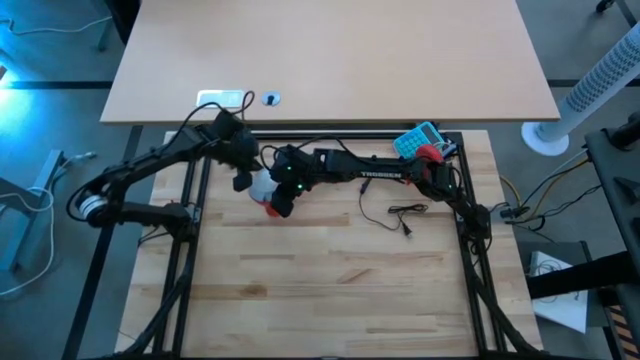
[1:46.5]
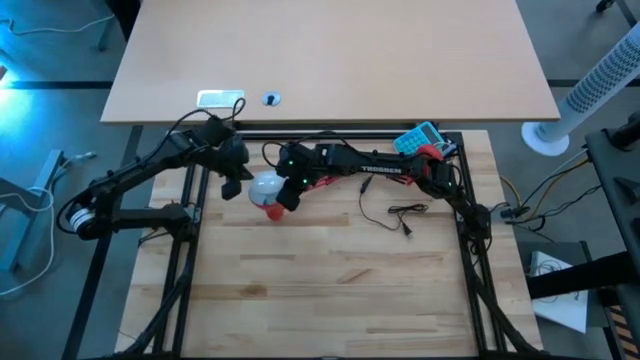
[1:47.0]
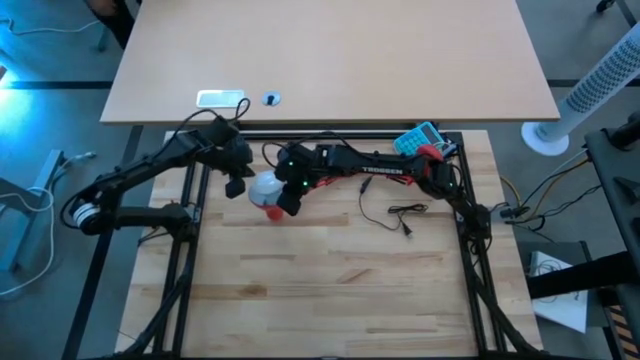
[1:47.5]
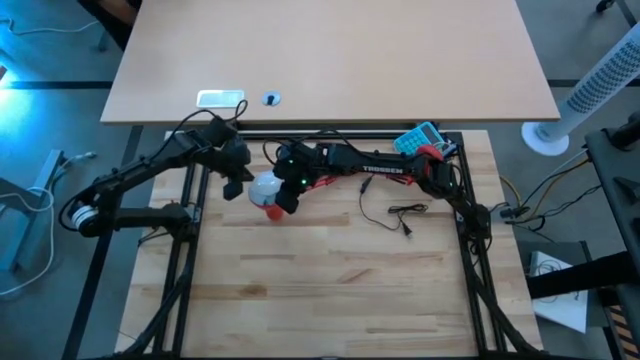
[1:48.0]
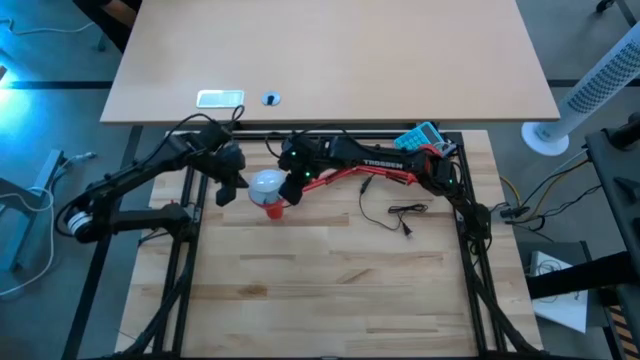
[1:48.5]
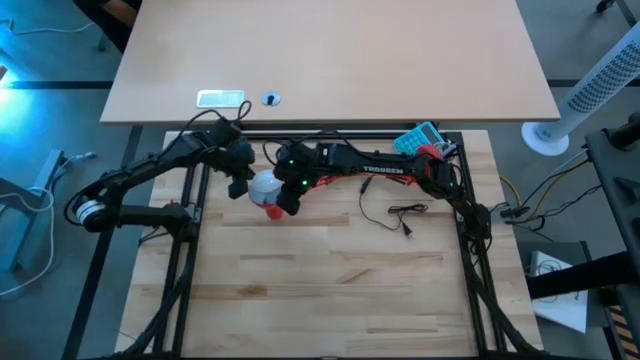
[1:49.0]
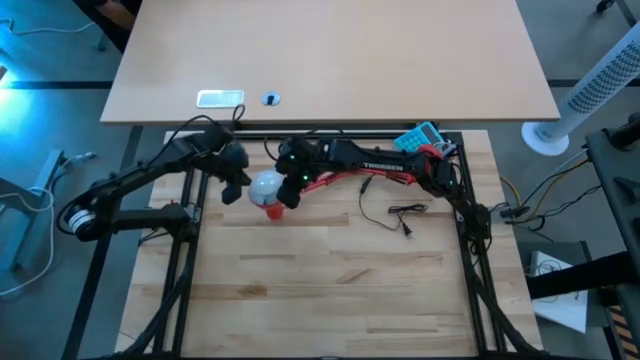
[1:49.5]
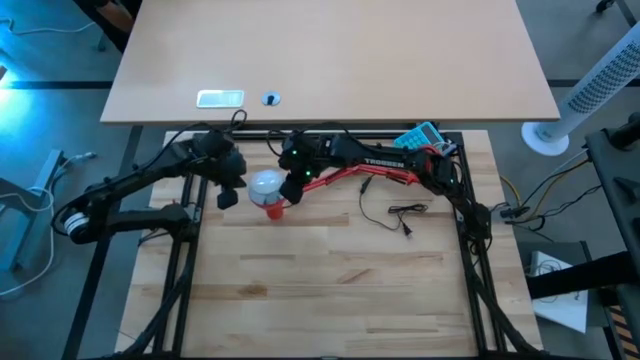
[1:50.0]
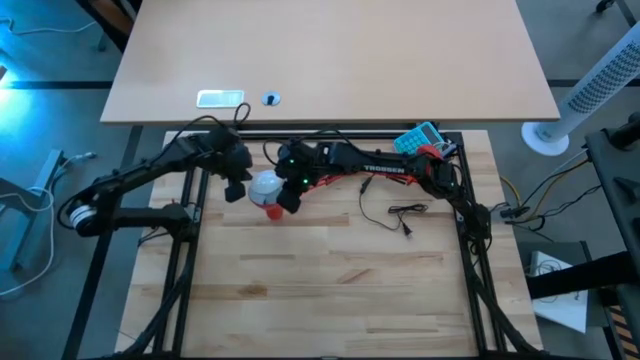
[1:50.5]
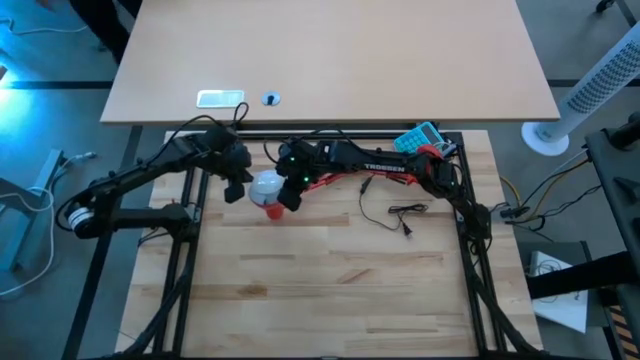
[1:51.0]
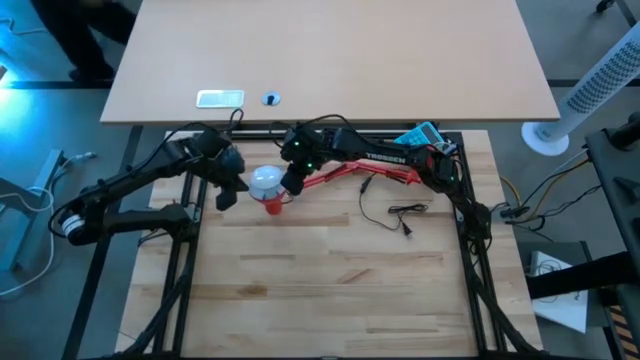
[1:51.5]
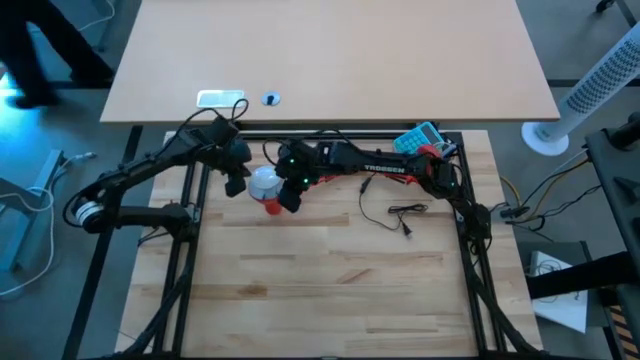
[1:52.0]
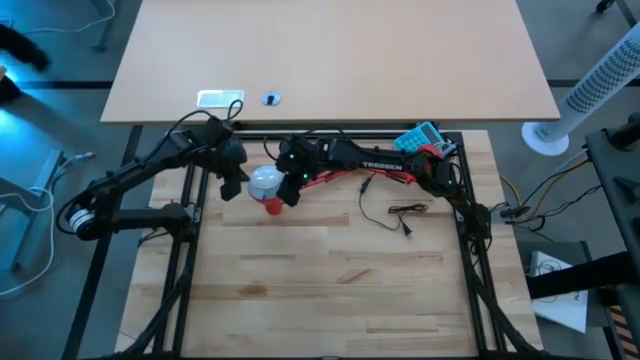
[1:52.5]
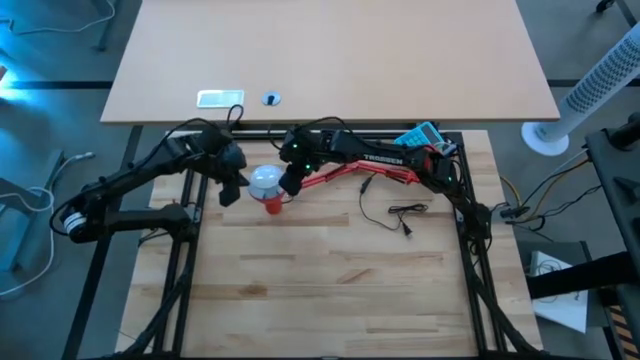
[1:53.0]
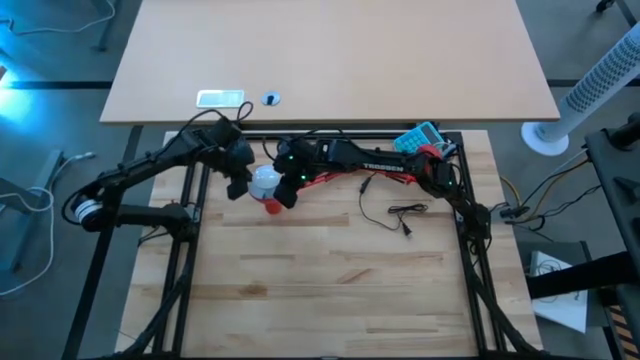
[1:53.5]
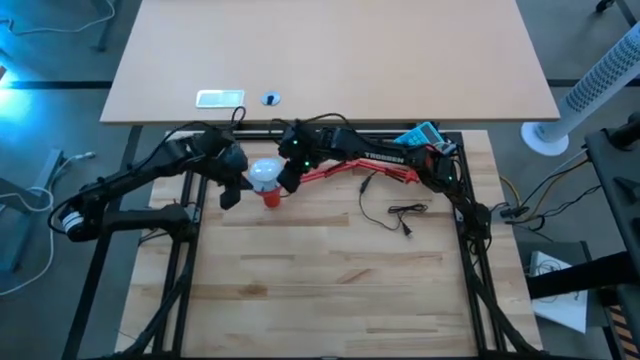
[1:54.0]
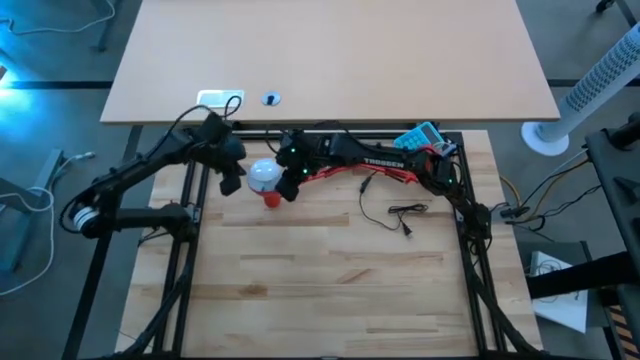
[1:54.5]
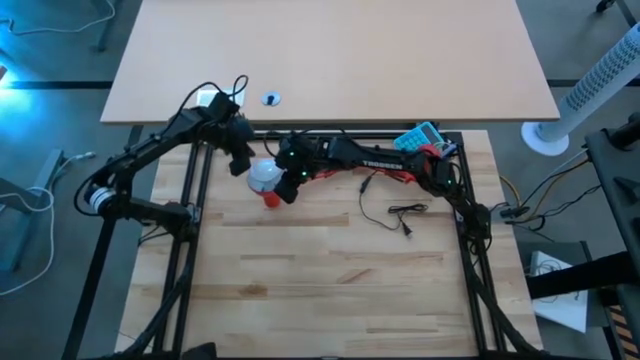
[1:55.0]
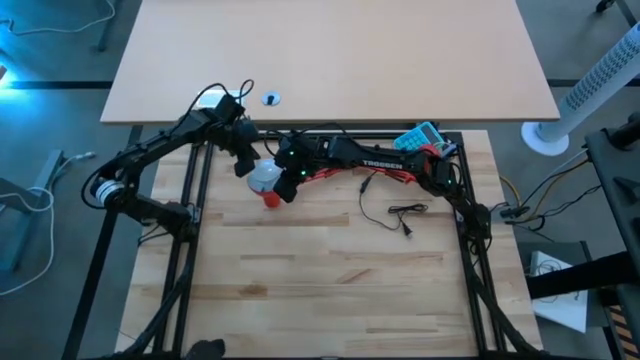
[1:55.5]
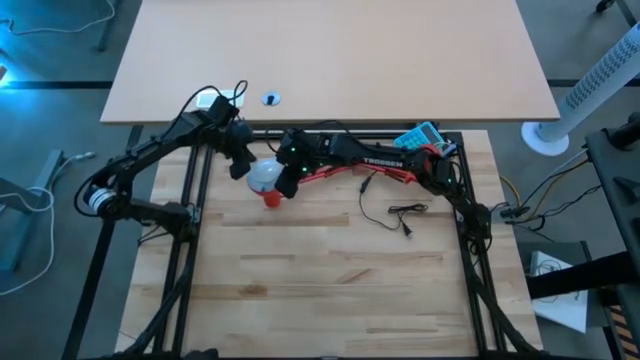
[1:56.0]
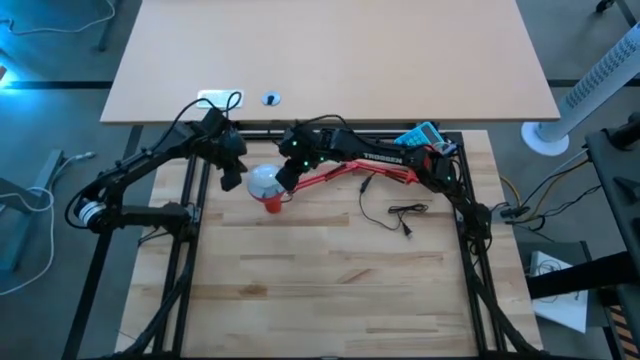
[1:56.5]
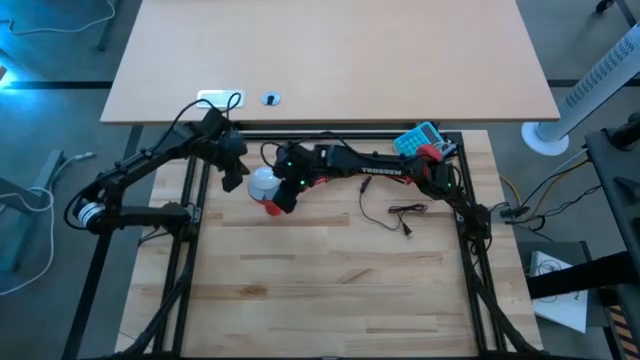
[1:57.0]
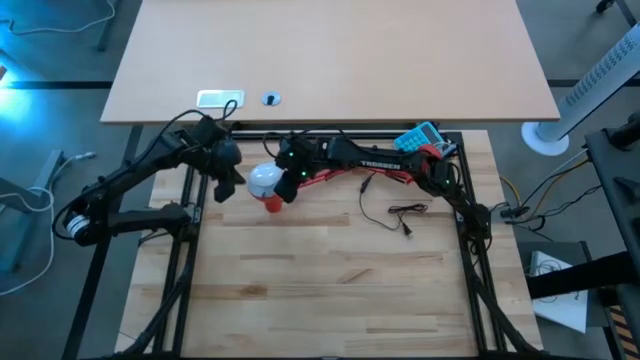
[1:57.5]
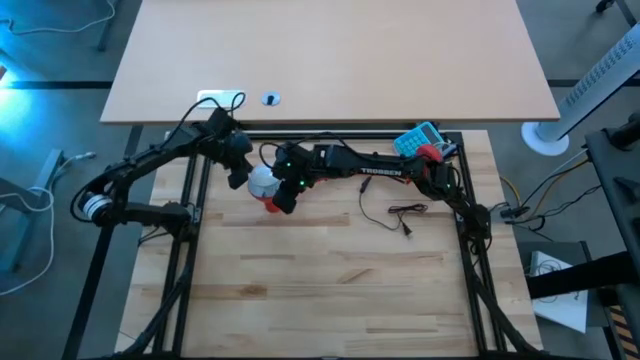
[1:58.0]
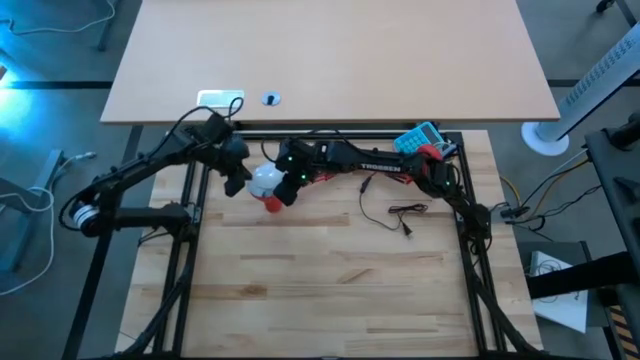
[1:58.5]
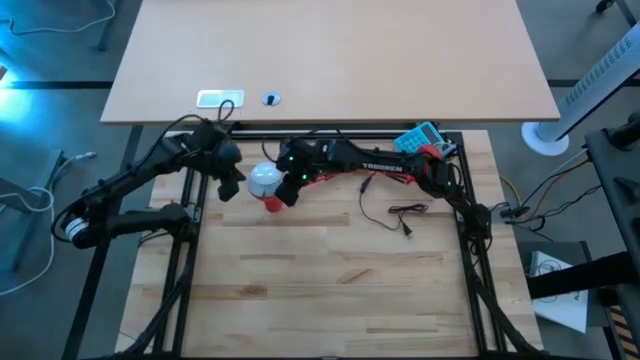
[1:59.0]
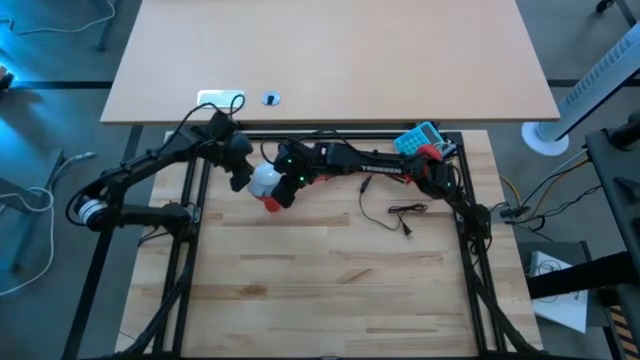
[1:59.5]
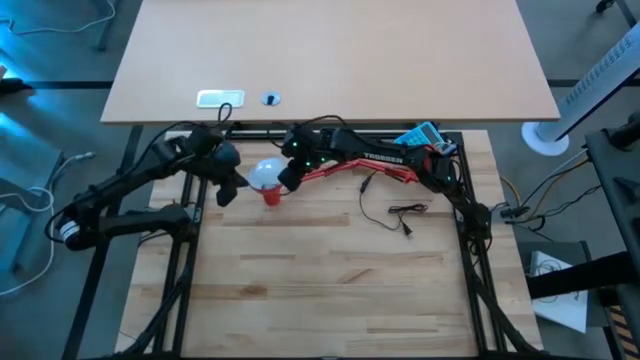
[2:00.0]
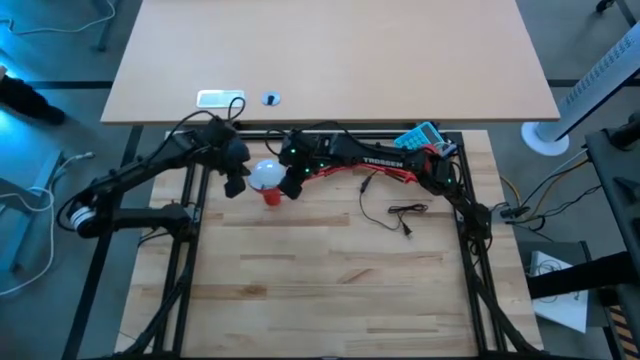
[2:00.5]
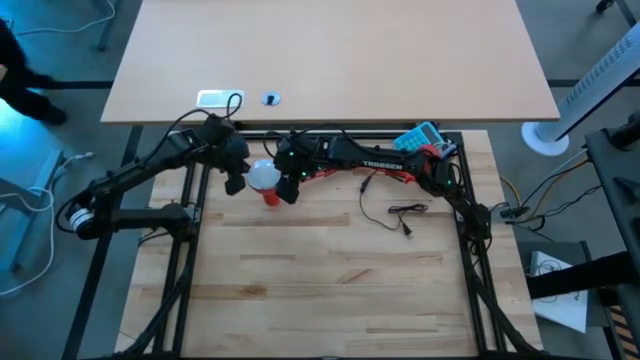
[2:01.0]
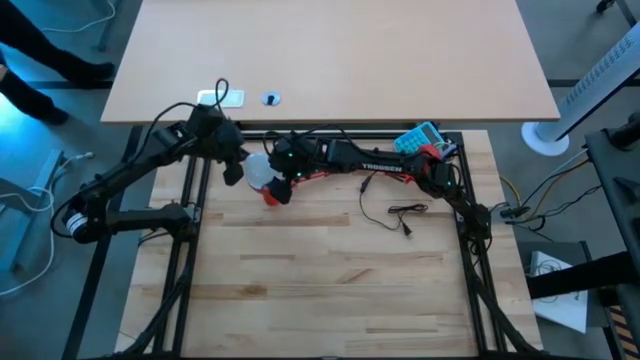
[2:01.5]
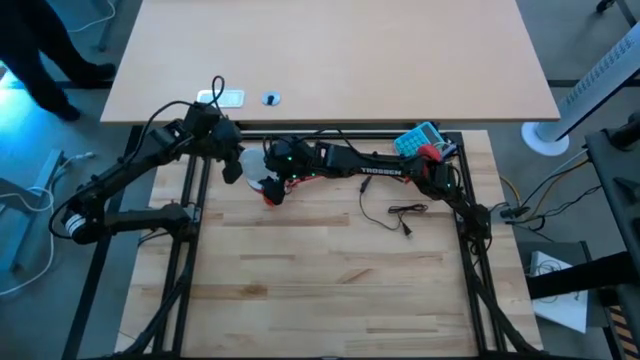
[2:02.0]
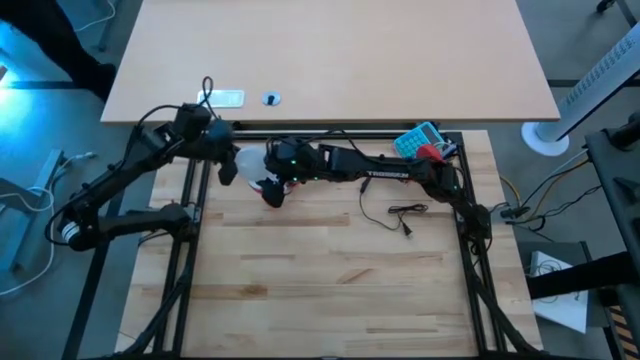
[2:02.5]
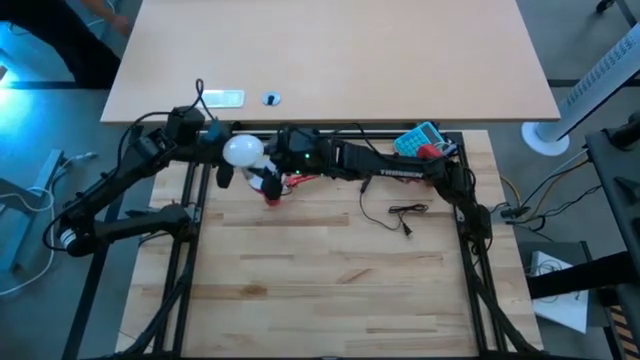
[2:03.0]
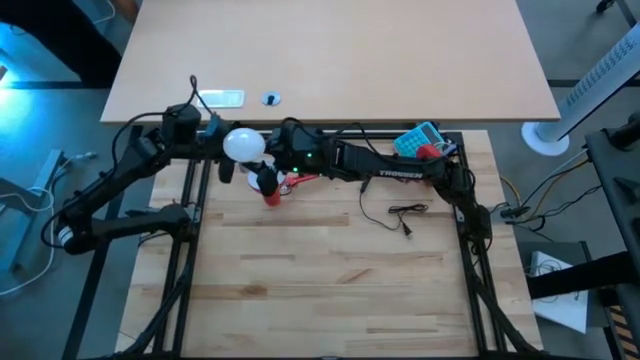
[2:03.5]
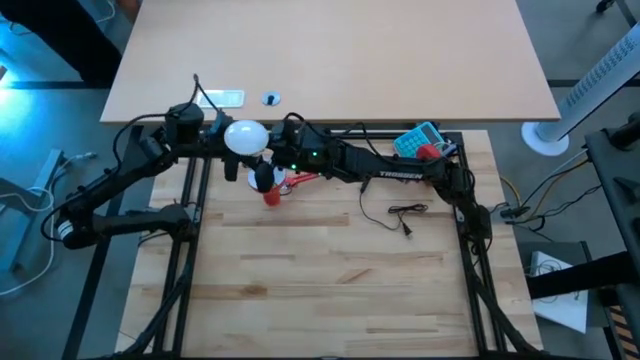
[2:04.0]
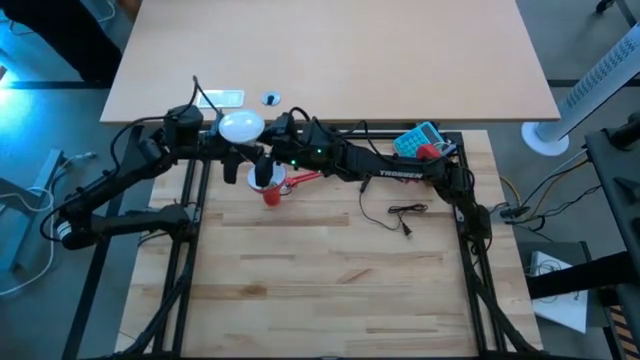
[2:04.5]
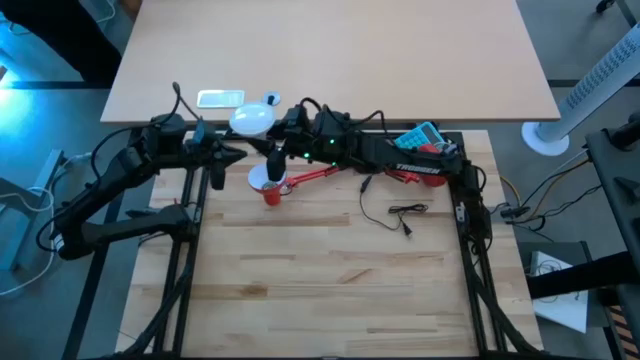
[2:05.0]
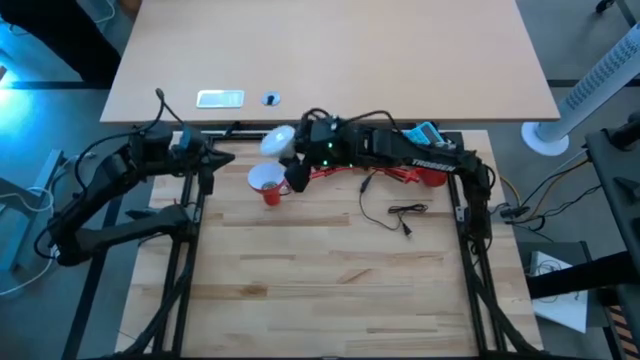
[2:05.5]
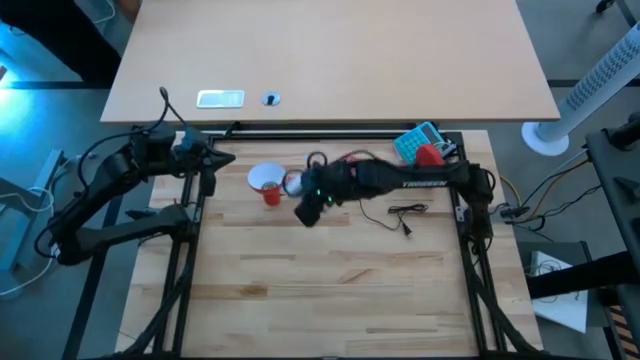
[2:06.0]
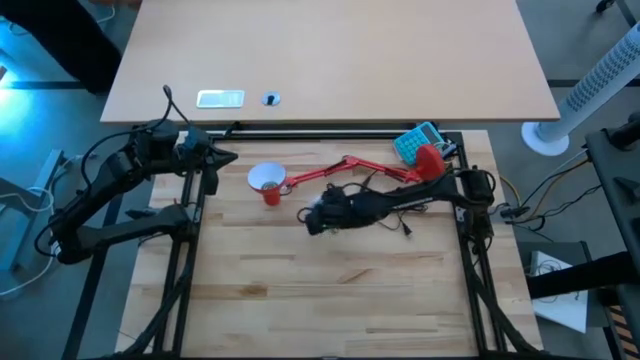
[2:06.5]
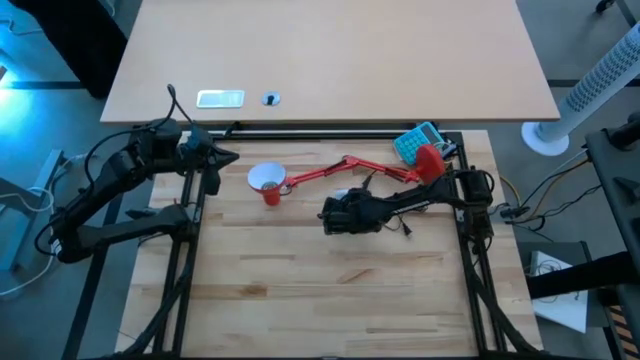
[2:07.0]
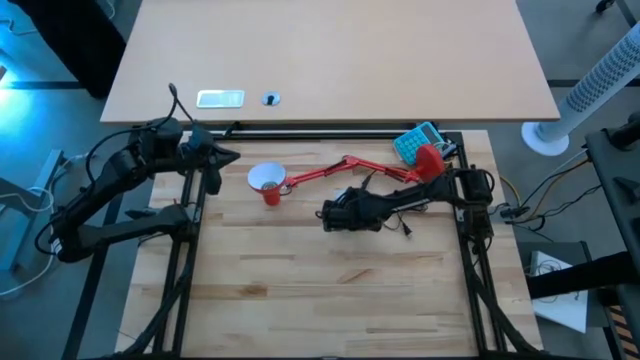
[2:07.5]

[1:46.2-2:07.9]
Task: Screw lightbulb
Remove the lightbulb from the orange desk lamp
